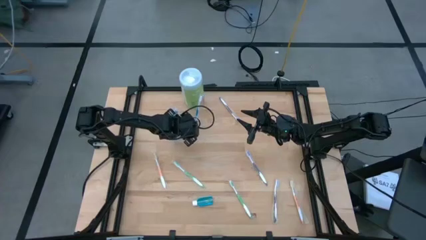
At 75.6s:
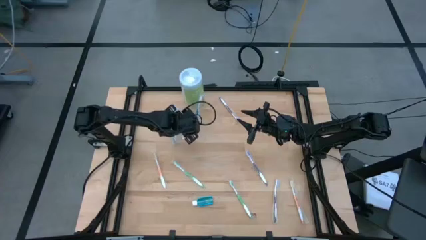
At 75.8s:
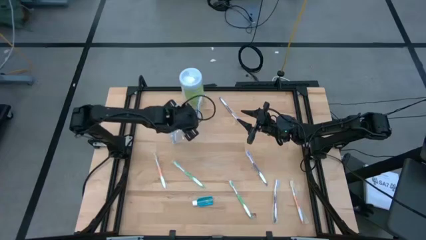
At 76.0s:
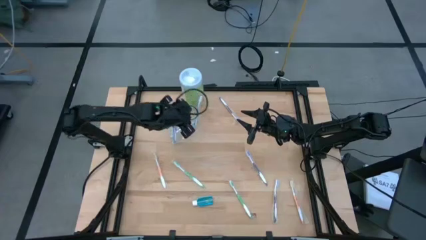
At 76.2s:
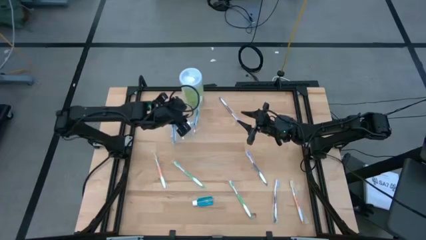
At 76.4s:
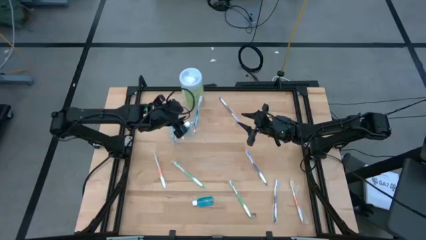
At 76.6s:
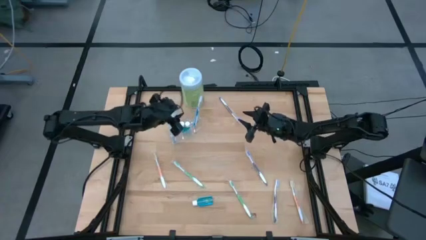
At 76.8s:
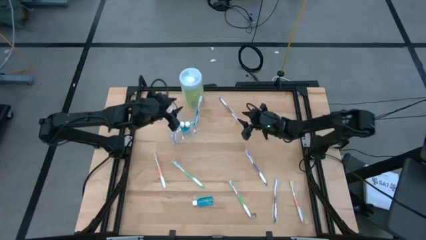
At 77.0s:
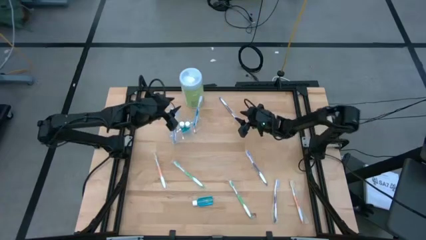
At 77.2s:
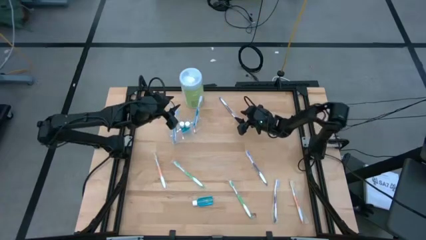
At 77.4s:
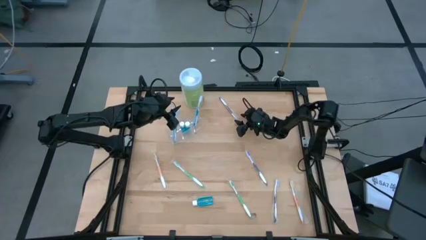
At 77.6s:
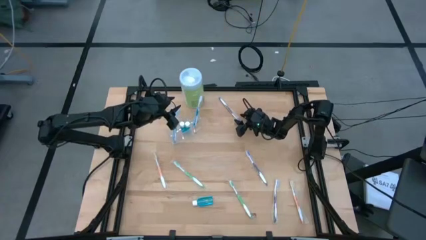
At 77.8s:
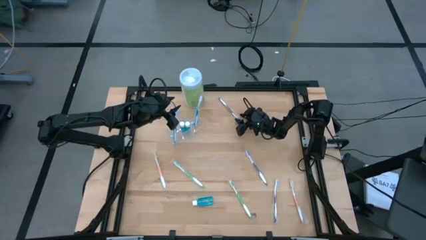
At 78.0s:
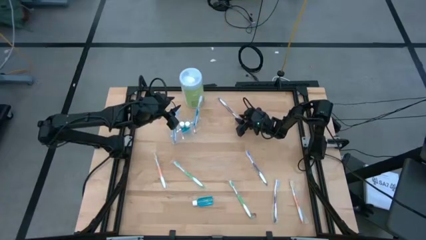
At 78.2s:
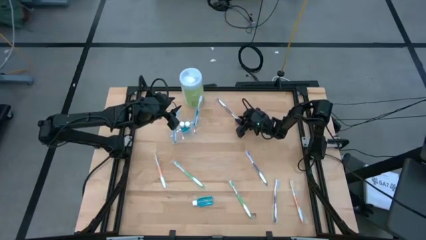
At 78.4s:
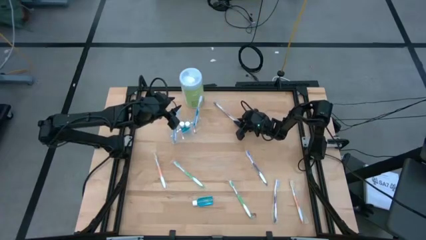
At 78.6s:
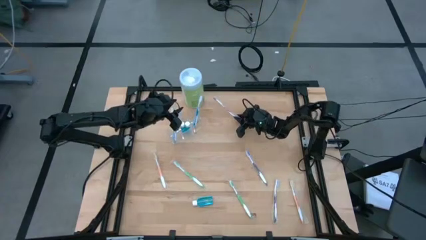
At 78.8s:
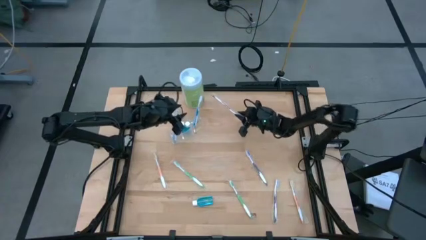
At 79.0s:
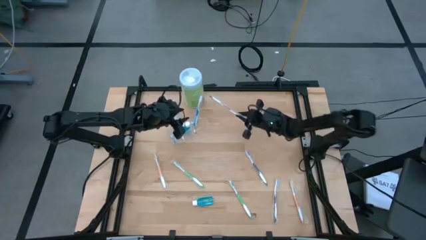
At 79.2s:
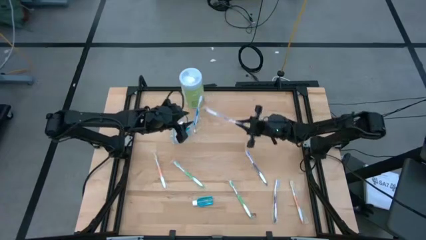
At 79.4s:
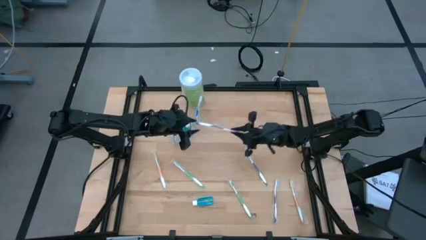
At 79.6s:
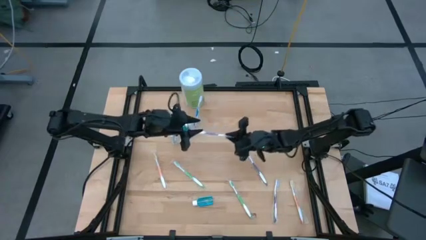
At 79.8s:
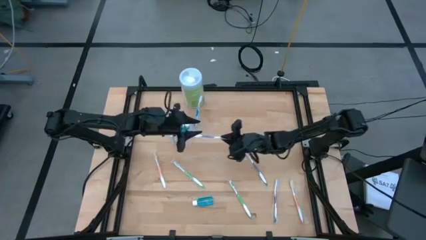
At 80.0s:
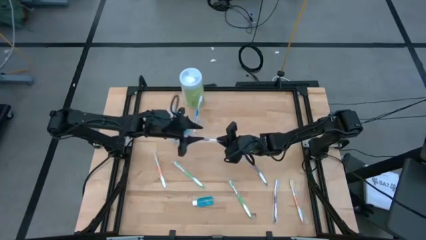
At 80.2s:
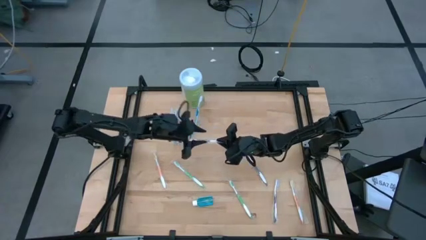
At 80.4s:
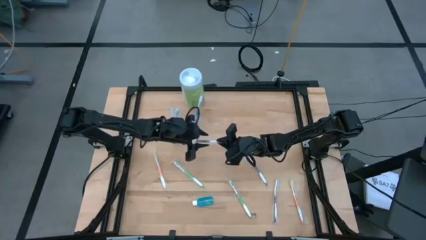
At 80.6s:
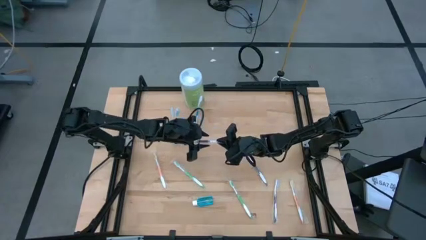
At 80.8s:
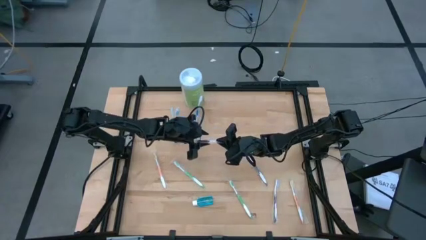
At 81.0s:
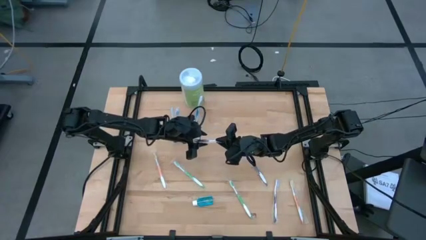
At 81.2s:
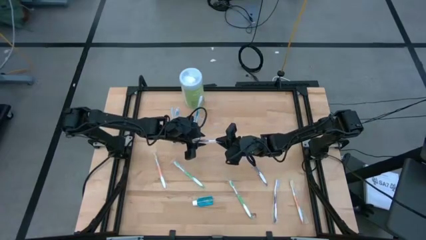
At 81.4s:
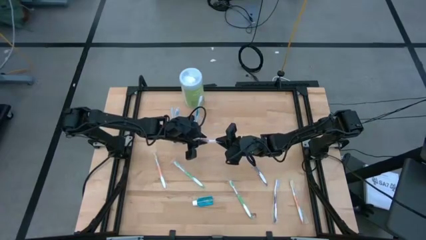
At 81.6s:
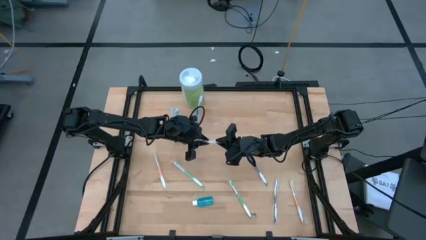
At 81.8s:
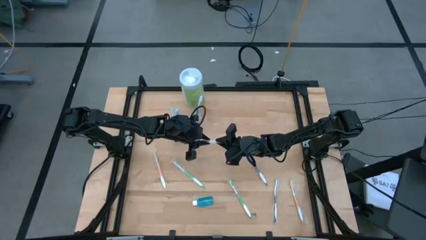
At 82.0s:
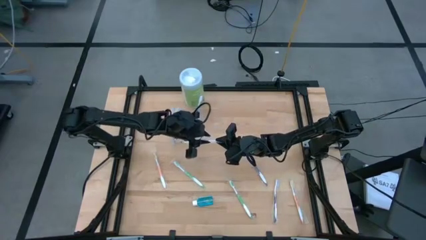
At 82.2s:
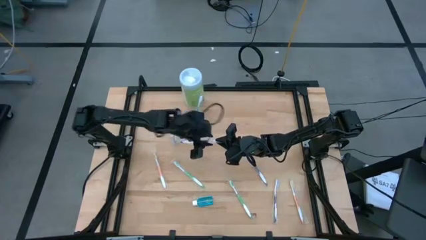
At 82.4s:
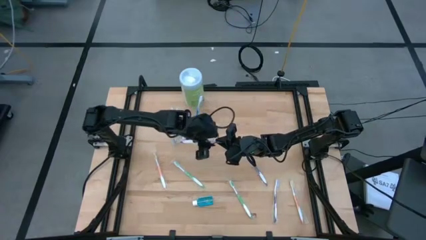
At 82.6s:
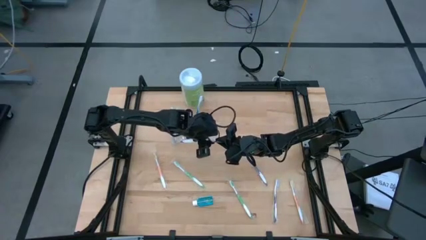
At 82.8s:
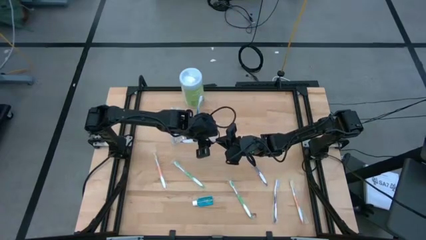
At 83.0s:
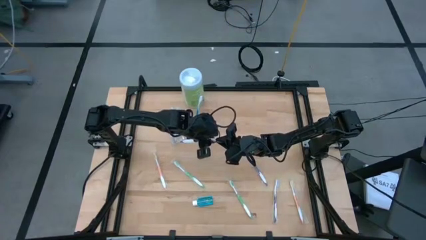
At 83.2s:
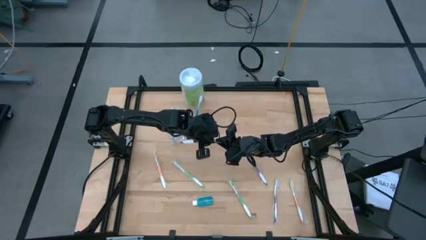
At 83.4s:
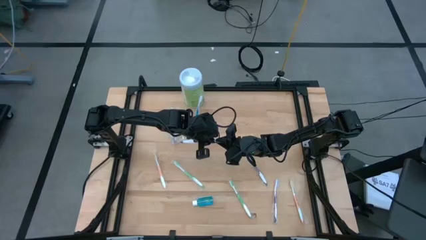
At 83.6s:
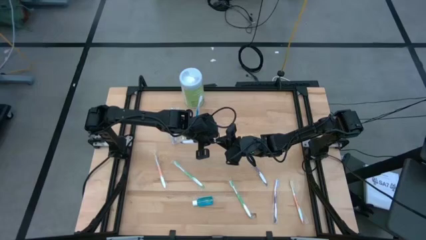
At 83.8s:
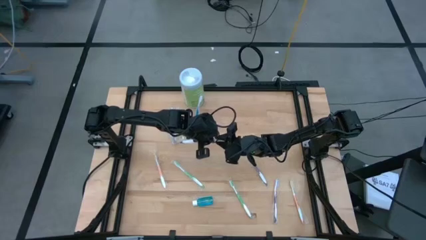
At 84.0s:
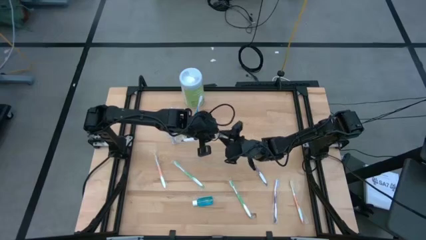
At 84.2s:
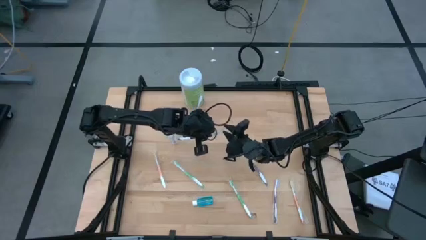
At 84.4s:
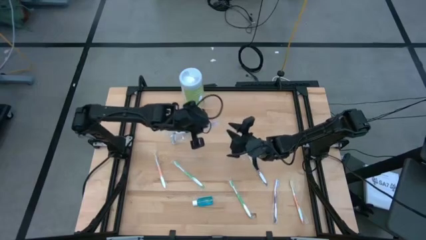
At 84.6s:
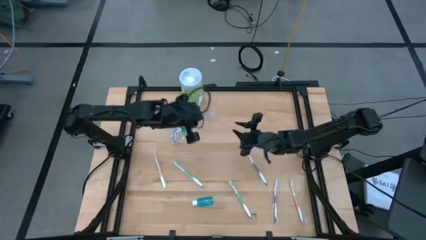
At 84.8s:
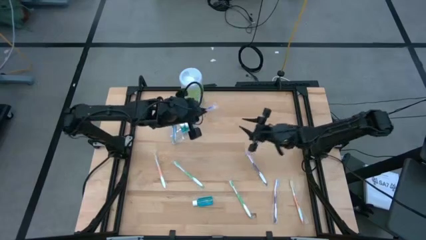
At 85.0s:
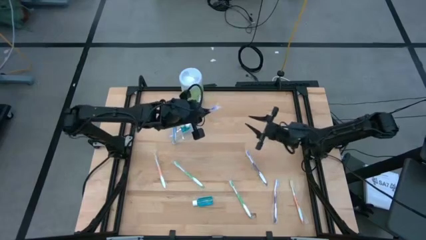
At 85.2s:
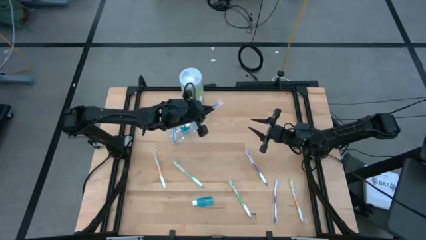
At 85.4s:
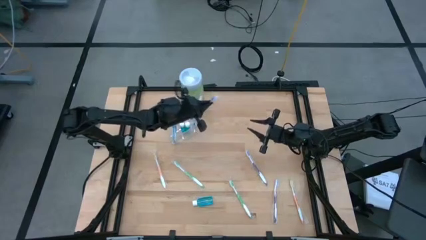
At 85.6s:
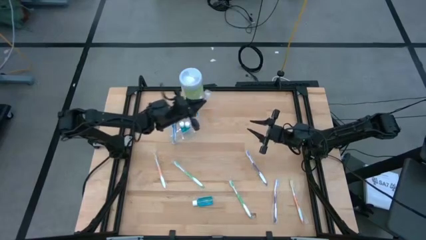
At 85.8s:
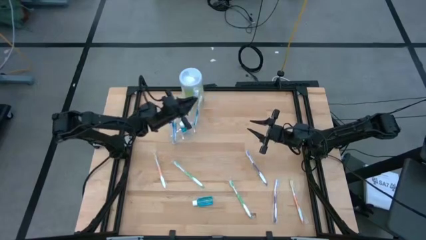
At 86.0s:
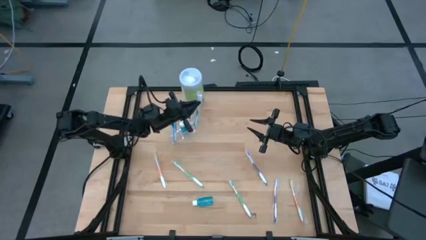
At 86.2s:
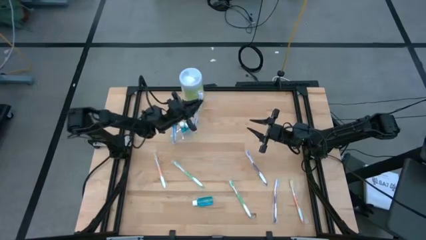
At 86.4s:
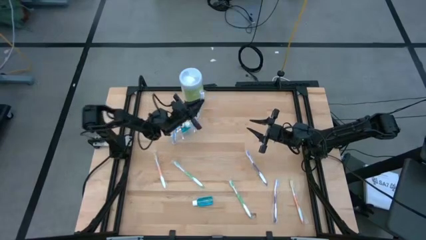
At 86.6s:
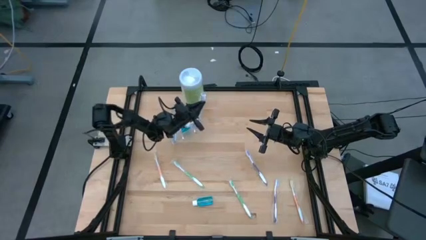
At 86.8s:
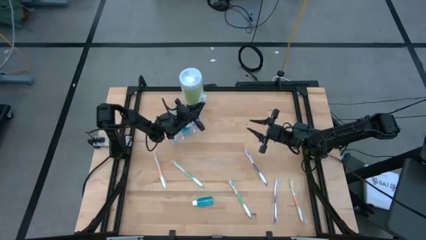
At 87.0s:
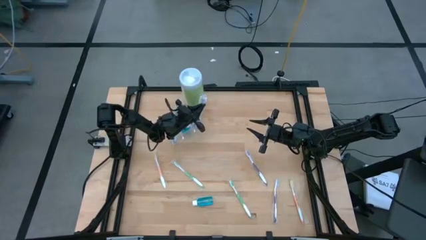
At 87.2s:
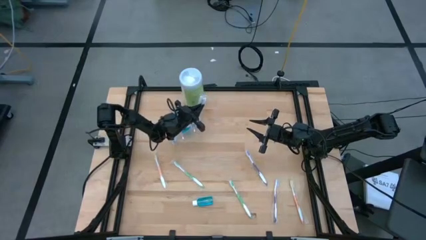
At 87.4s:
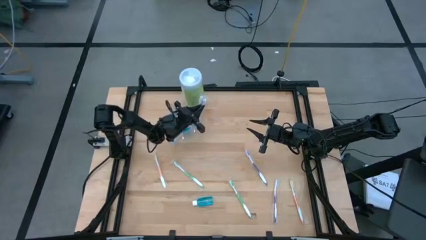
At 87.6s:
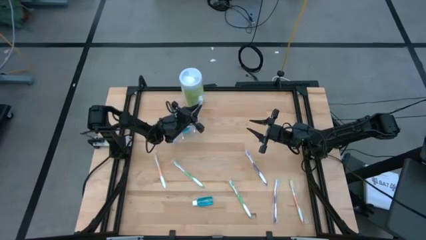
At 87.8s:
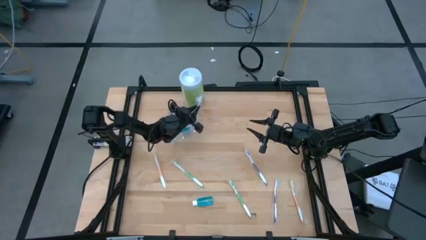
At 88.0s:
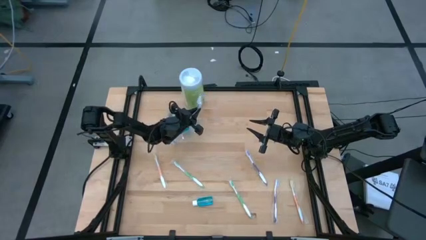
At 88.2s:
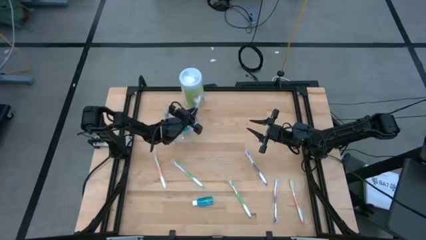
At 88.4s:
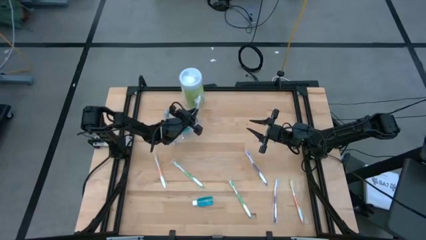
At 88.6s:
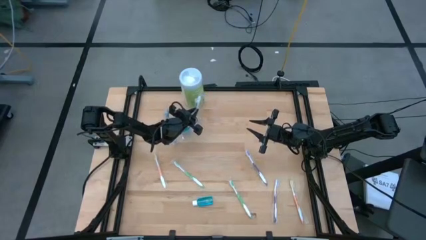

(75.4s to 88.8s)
Task: Pick & Place toothbrushing station
Put the top purple toothbrush into the transparent organizer

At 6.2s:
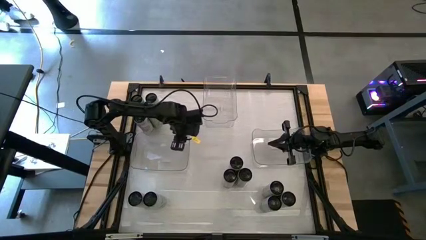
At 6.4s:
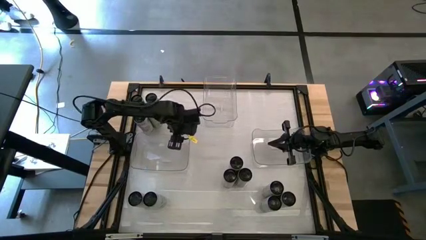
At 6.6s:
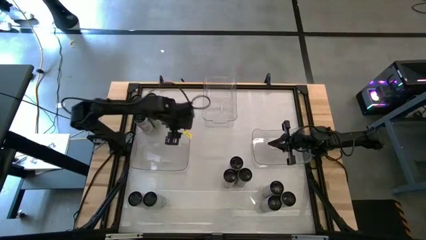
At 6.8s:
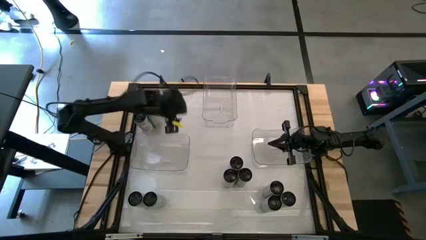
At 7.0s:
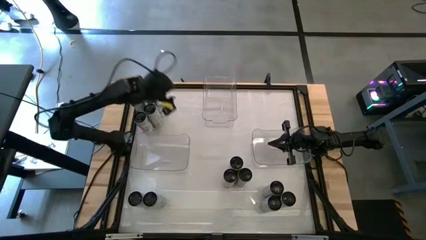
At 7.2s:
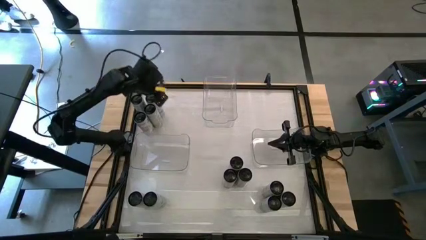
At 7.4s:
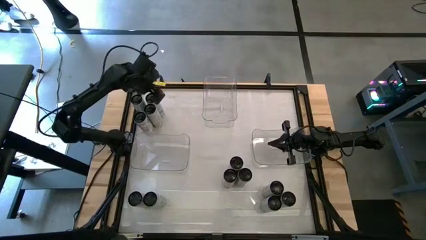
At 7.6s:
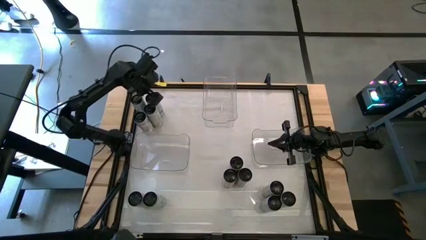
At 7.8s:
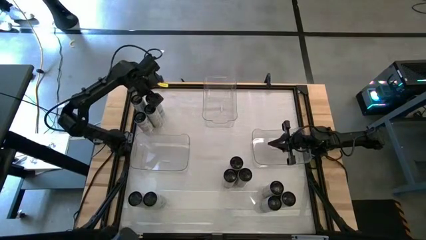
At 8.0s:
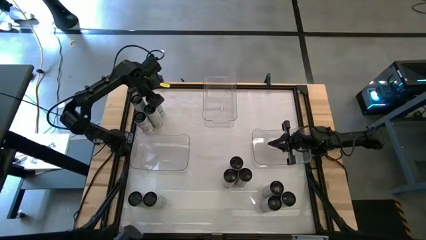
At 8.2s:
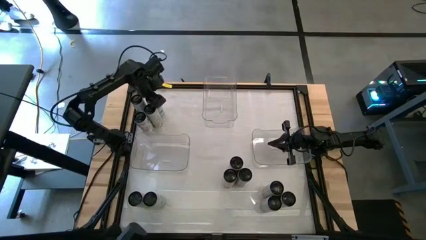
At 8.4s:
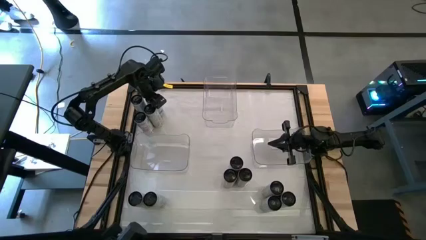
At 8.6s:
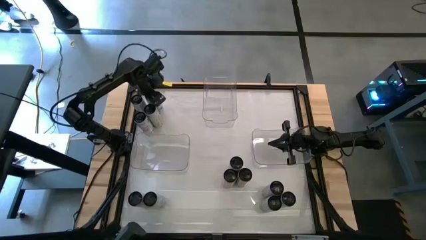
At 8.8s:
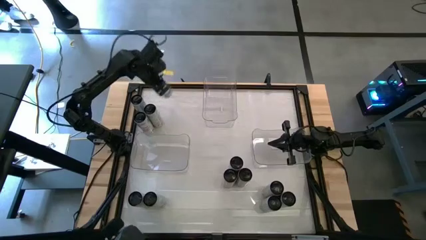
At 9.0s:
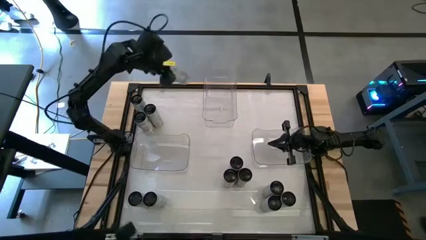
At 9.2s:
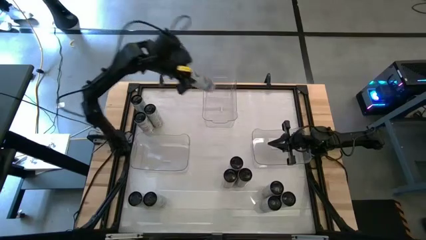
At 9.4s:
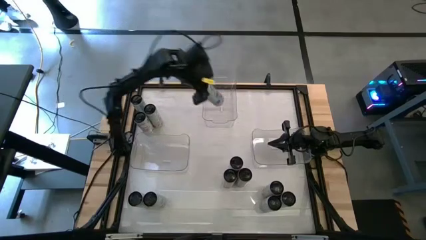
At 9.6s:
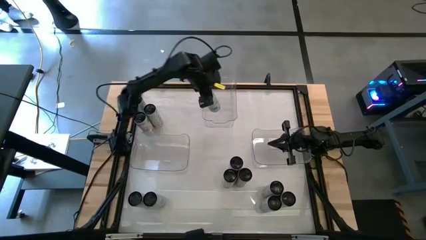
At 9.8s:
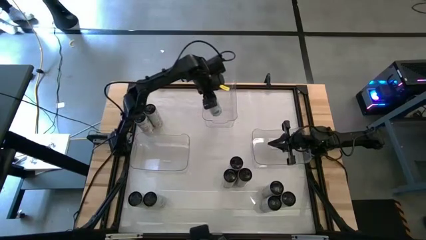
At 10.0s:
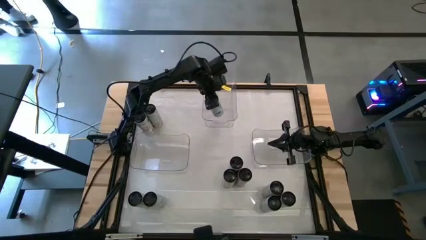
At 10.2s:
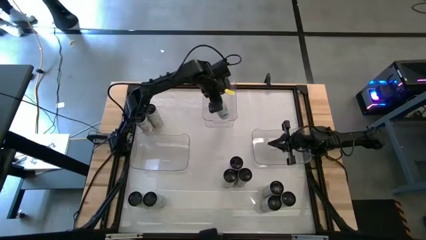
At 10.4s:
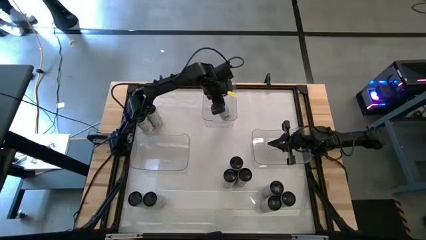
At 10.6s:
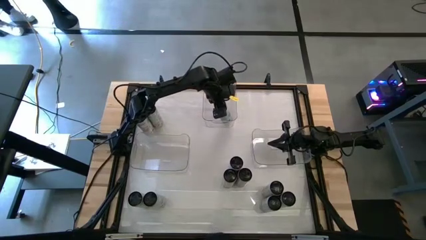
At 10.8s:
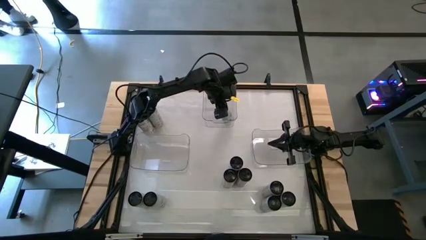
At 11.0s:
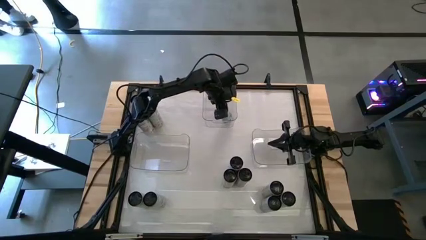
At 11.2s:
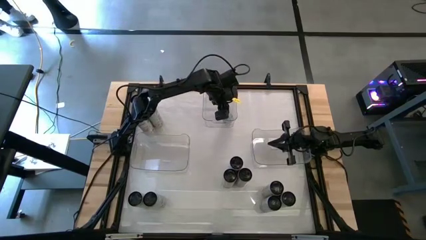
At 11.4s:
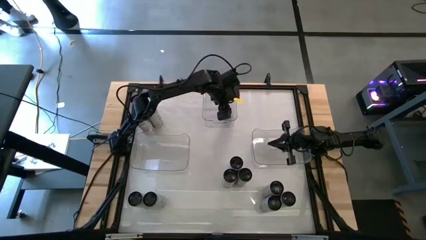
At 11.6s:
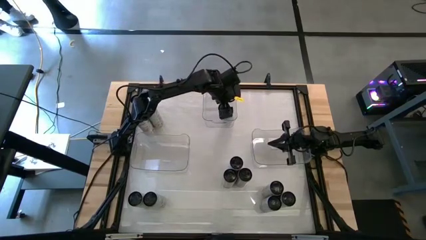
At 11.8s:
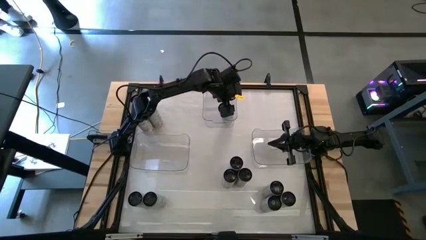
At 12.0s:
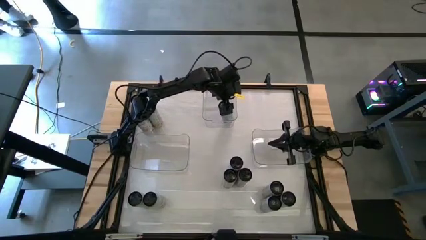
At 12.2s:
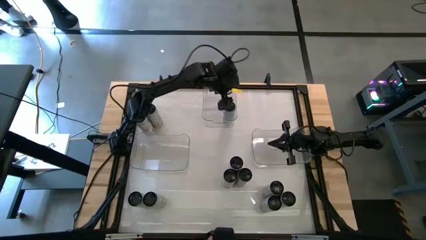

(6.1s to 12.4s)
Task: Sort soda cans
Put the top left white-blue soda can into the top middle transparent bin
